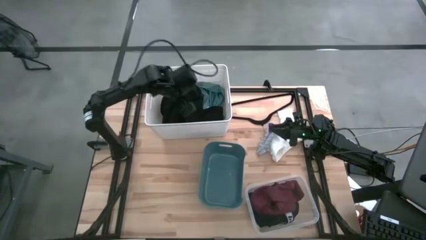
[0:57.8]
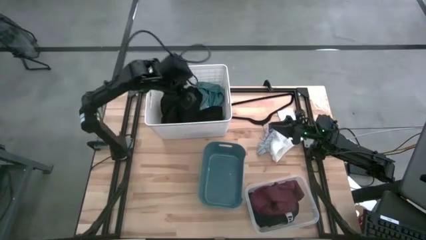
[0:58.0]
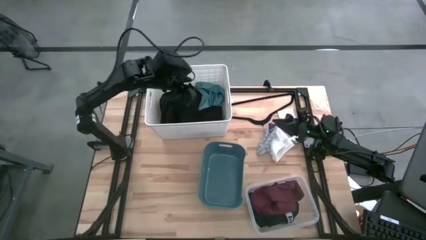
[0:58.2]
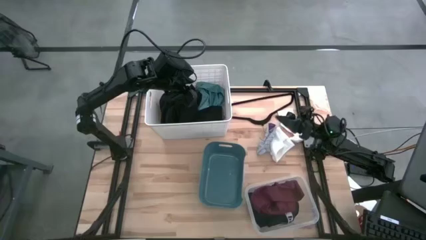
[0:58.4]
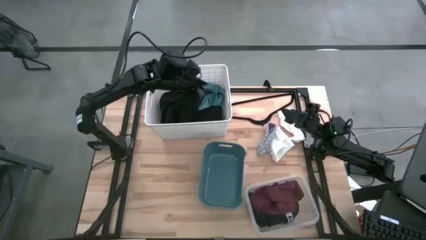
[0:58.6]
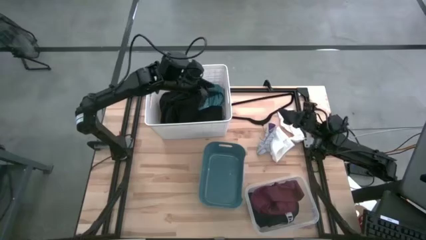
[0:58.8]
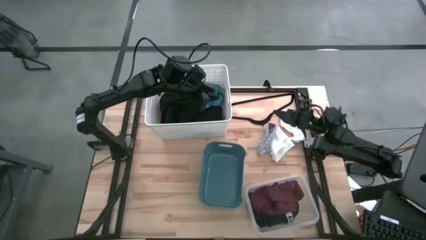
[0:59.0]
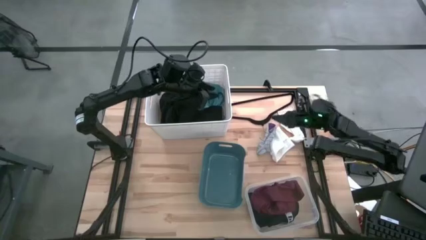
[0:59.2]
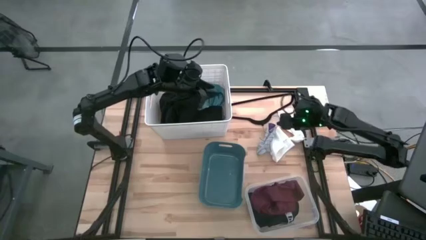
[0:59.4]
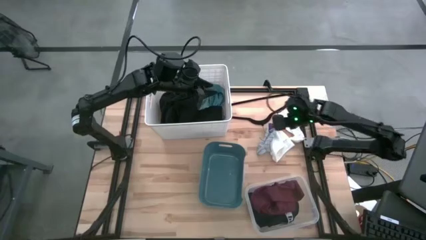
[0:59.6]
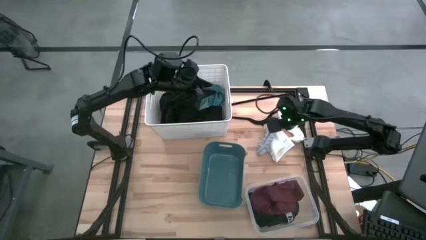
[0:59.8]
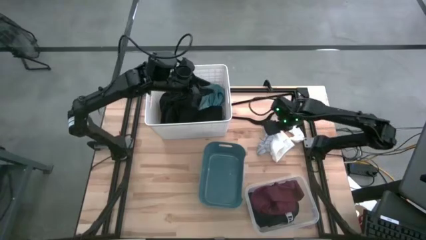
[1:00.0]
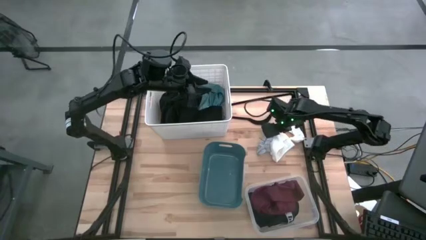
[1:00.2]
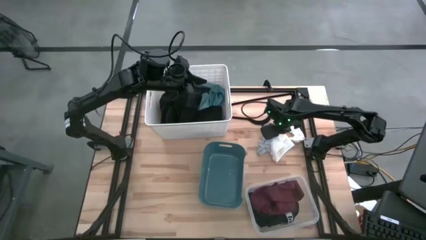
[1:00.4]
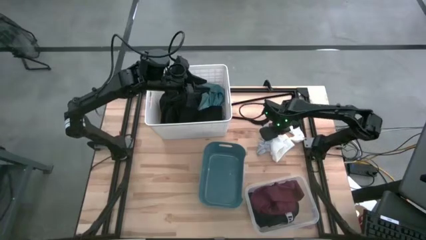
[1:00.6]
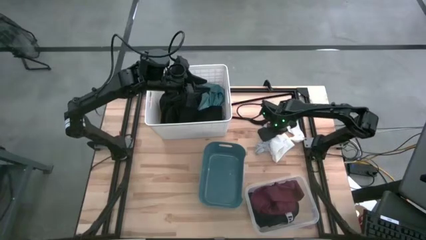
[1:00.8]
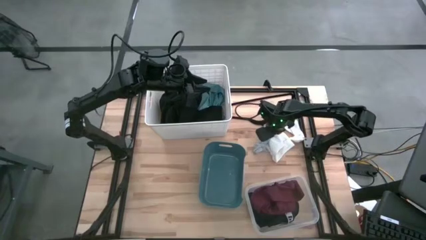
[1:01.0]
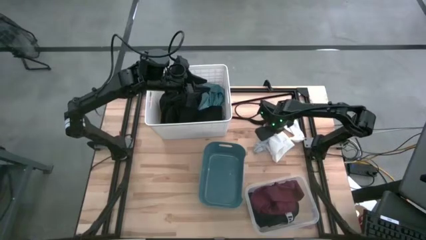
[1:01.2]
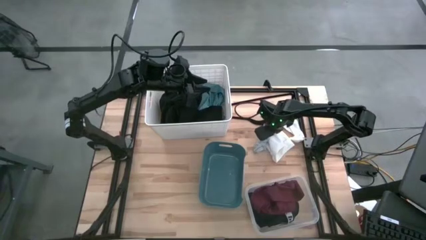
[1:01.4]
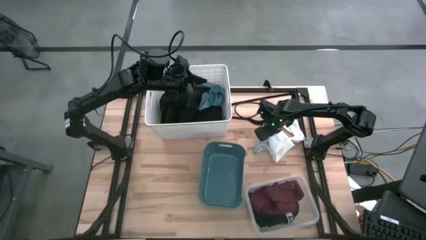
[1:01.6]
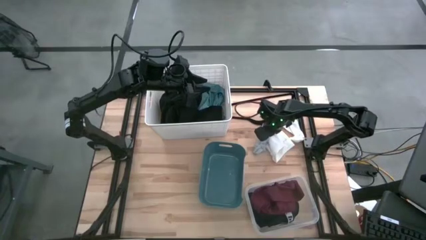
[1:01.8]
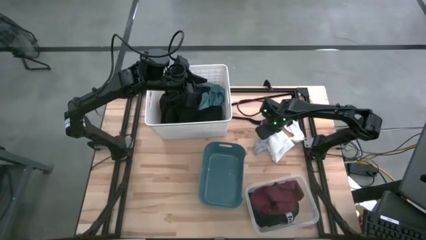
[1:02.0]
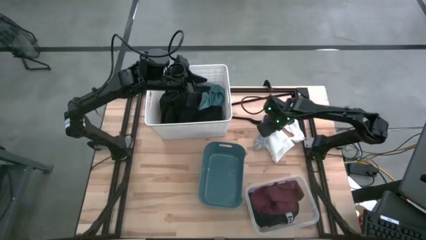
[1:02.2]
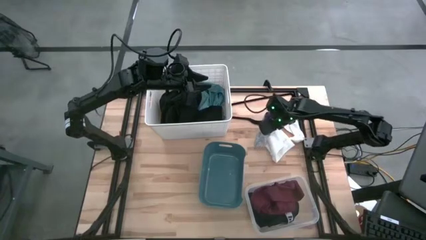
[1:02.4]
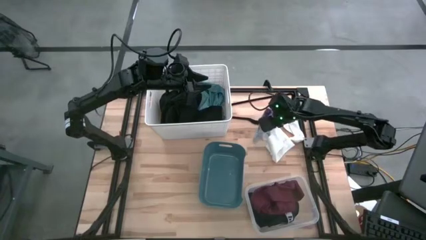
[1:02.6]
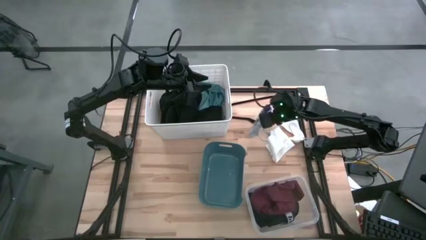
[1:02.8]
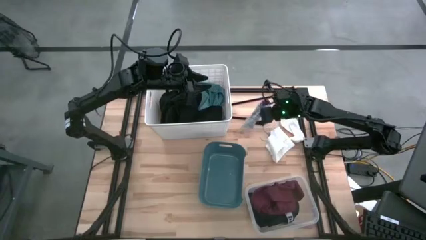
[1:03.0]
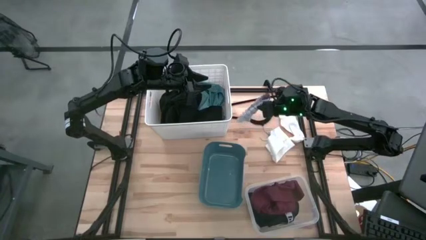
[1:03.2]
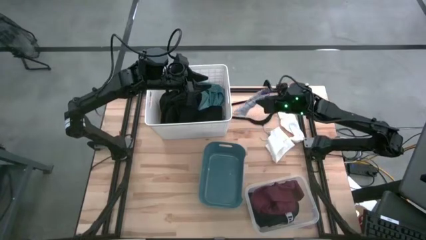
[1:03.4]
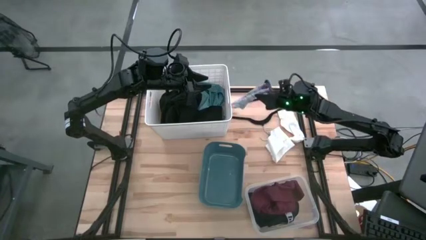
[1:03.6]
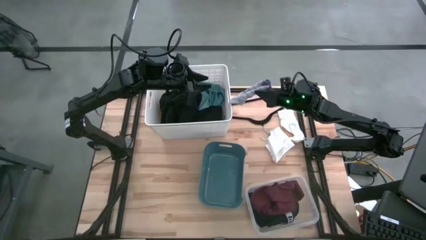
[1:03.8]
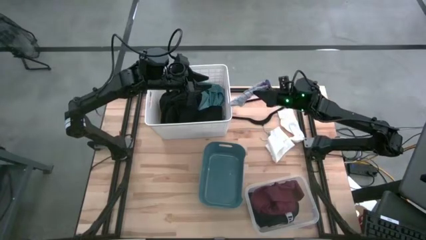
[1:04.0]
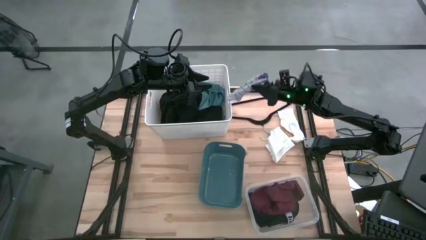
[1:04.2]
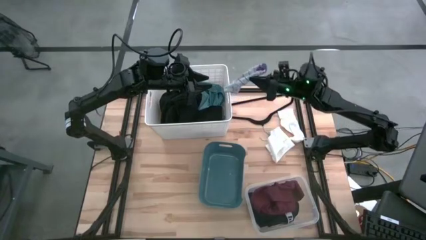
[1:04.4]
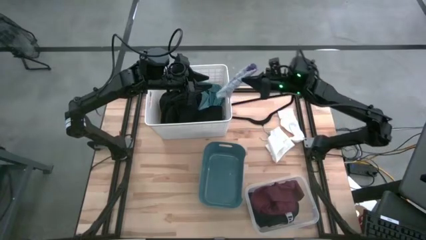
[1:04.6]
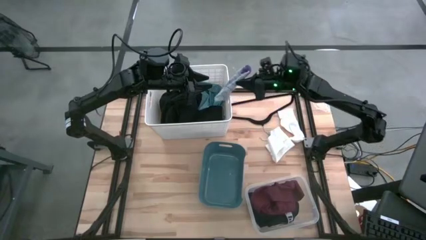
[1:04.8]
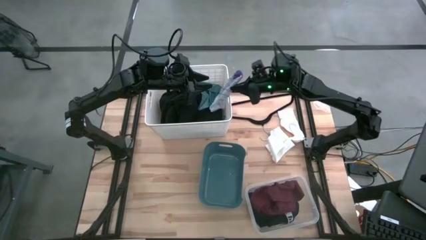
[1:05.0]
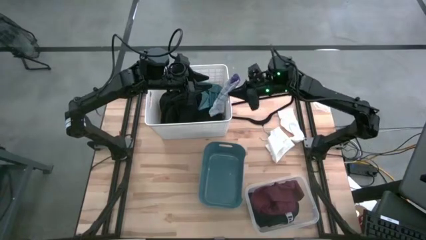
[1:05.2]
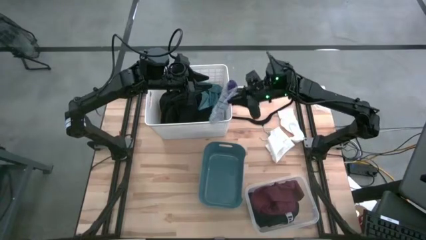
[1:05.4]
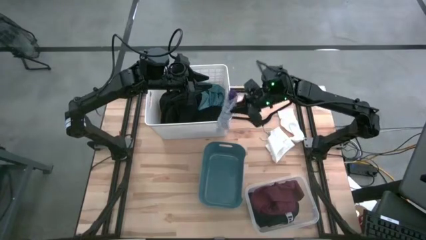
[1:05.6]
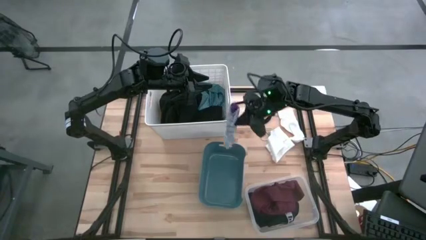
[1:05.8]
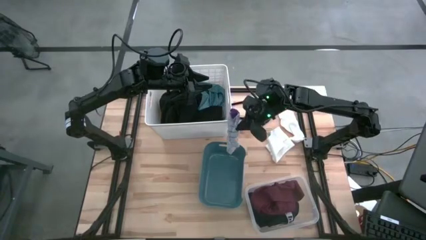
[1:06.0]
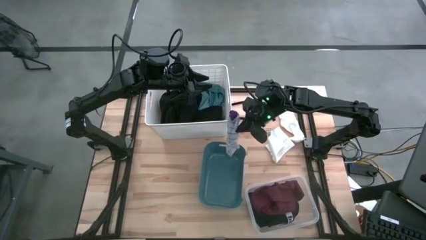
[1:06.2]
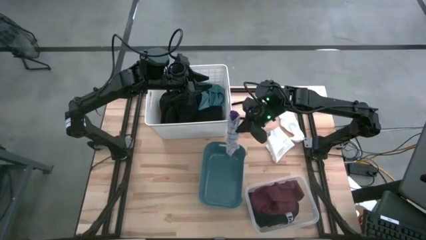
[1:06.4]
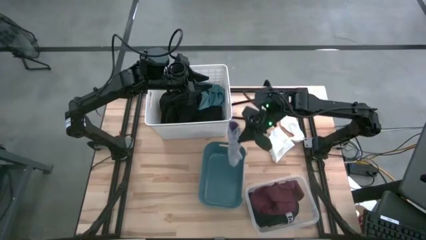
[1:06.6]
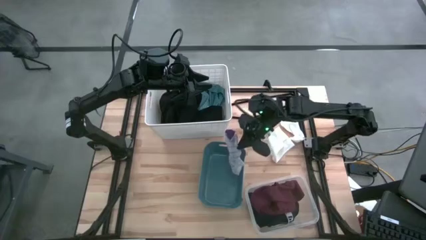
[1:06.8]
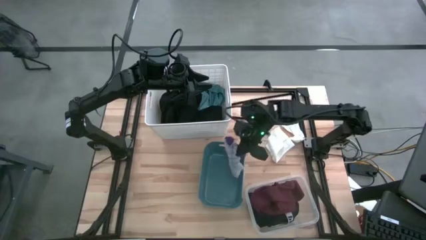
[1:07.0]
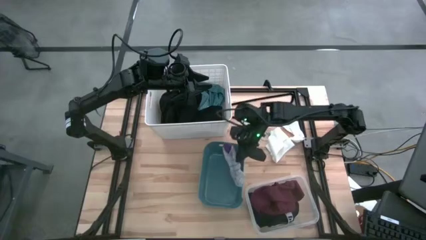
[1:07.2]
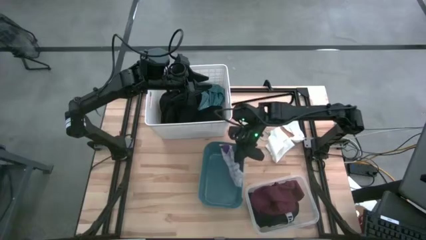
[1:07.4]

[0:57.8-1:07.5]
Task: Pick & Place Cloths
Put the gray sock into the blue bin

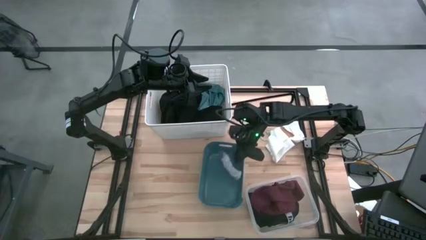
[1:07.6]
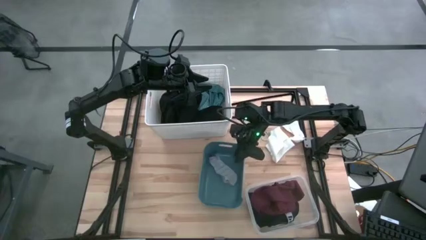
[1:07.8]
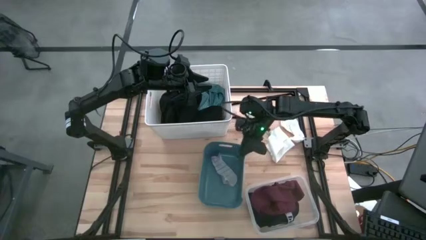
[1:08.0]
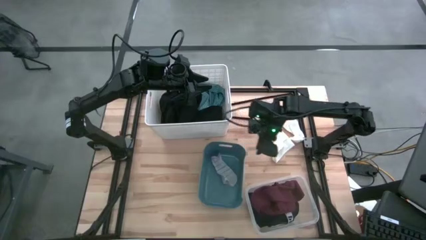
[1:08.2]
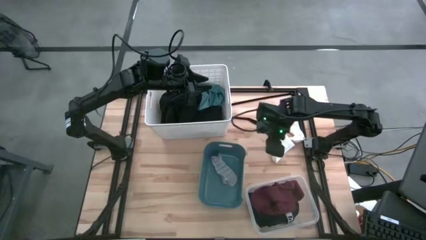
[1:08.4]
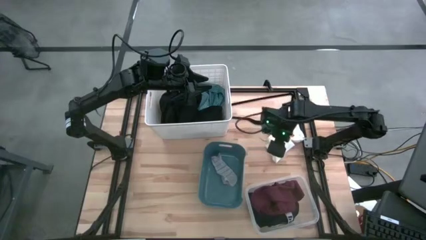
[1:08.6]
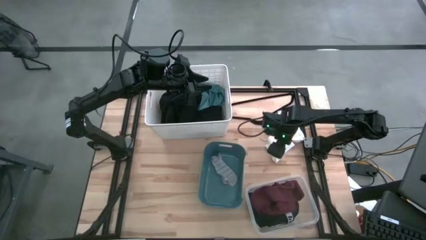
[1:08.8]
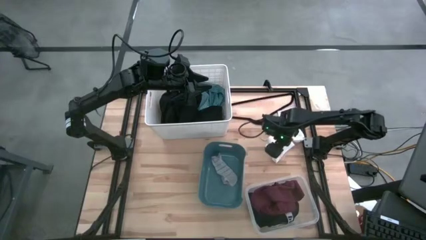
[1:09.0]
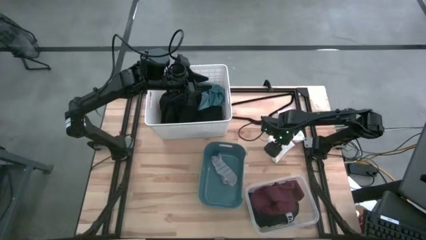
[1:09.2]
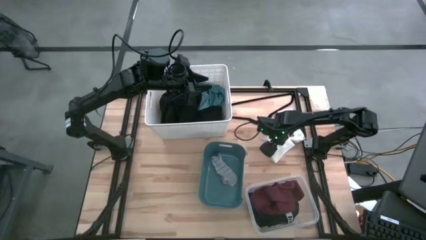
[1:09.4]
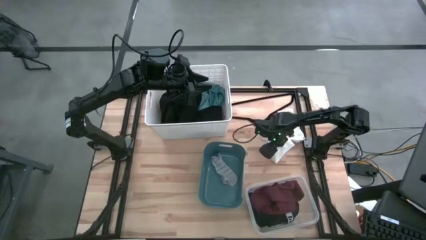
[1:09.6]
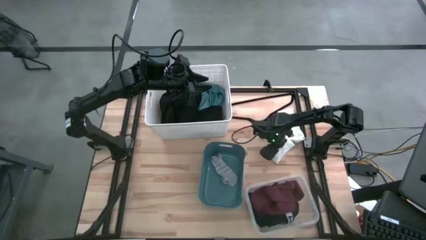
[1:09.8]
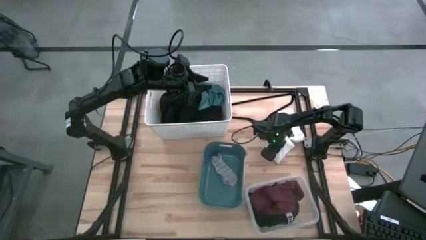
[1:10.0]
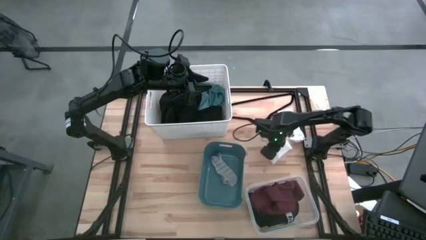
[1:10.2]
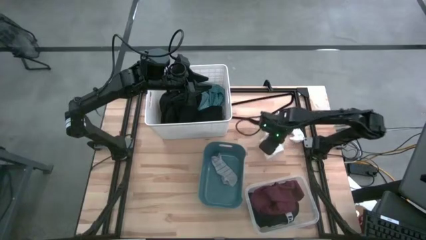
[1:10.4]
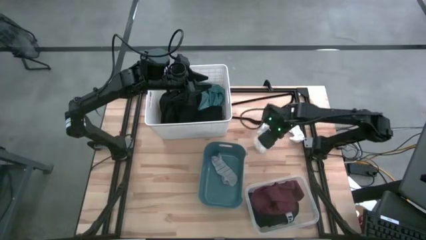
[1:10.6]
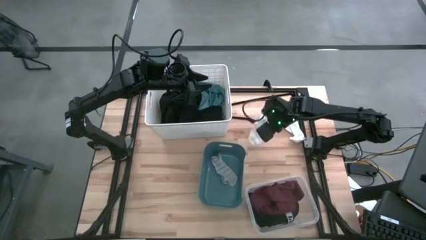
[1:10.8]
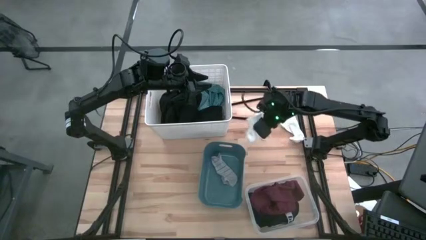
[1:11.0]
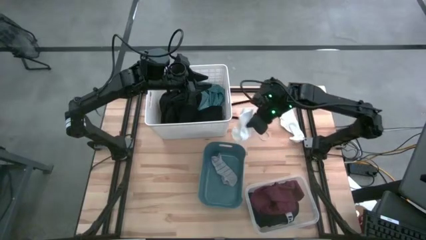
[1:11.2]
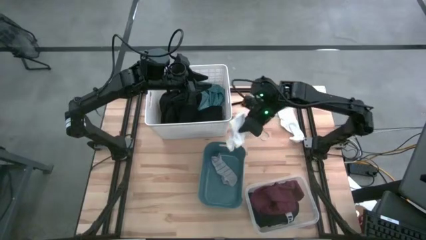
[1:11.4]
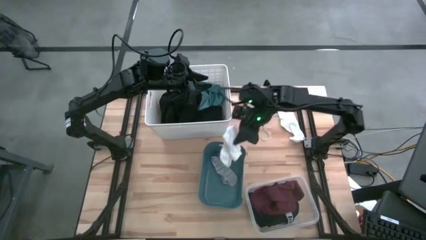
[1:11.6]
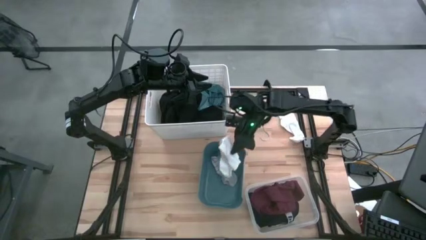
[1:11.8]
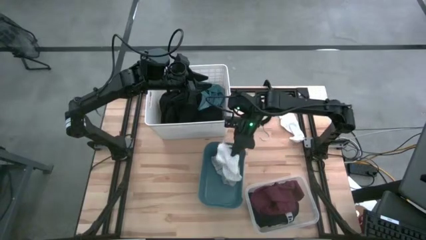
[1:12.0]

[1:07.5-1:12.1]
Put the left white sock into the blue bin
